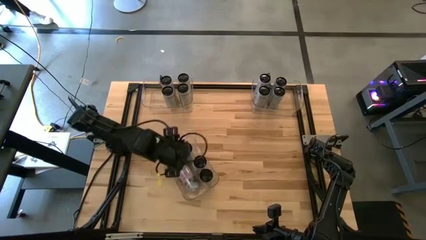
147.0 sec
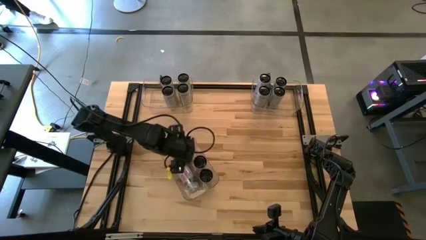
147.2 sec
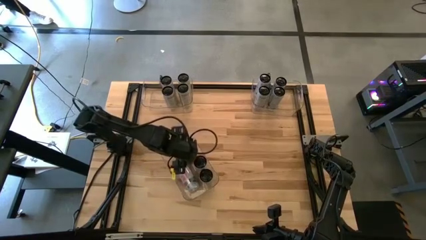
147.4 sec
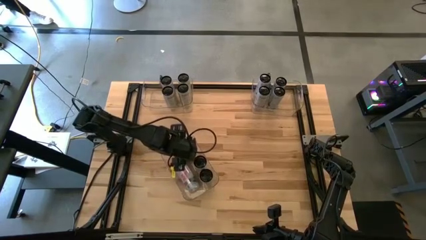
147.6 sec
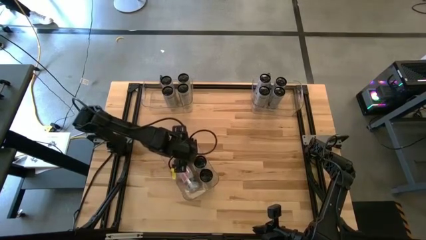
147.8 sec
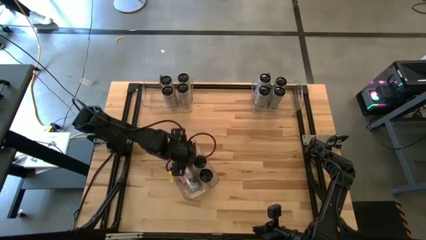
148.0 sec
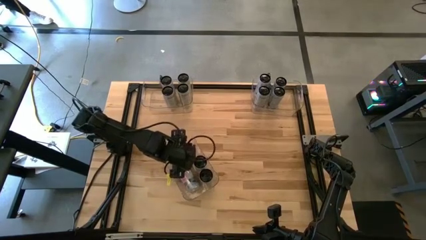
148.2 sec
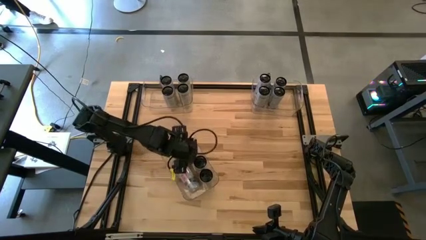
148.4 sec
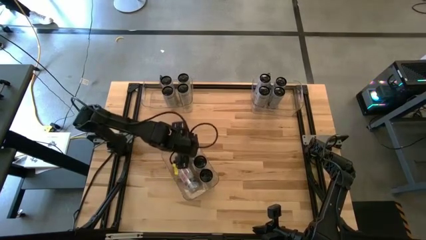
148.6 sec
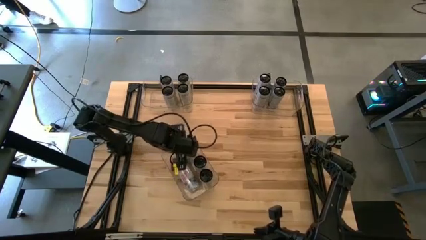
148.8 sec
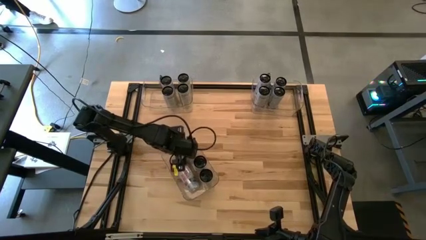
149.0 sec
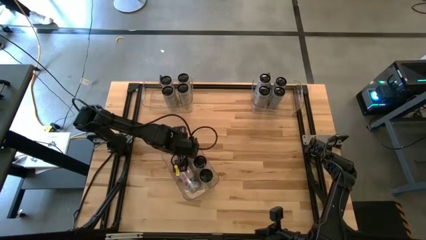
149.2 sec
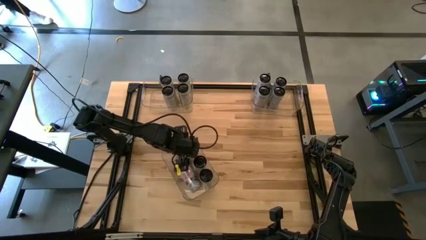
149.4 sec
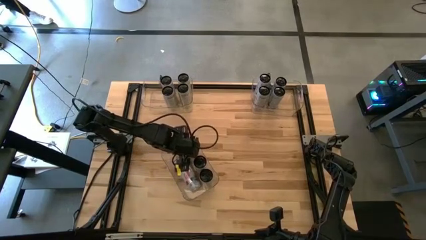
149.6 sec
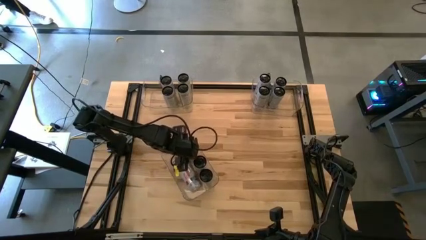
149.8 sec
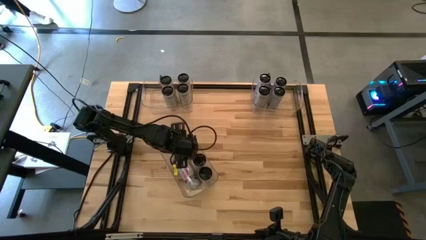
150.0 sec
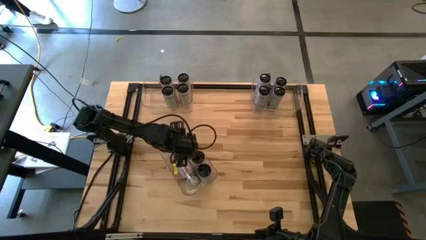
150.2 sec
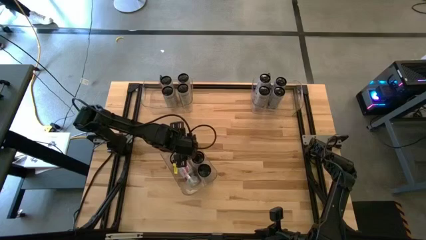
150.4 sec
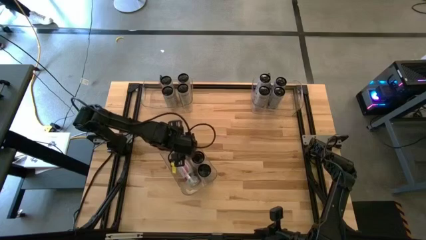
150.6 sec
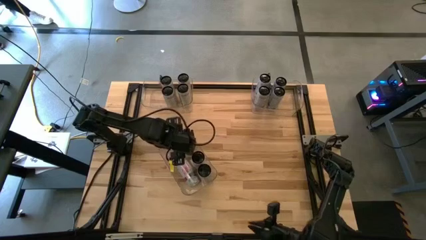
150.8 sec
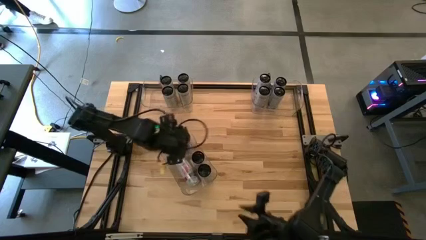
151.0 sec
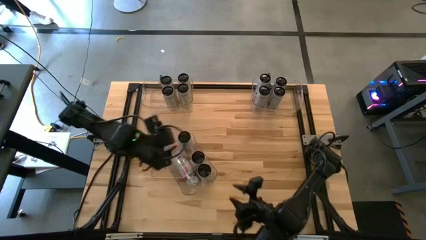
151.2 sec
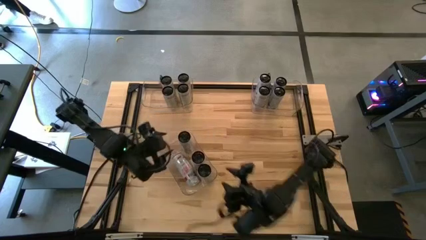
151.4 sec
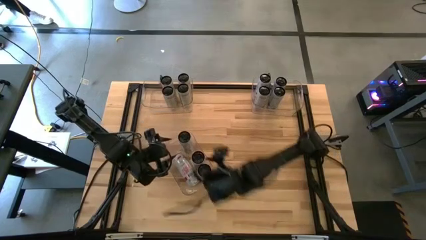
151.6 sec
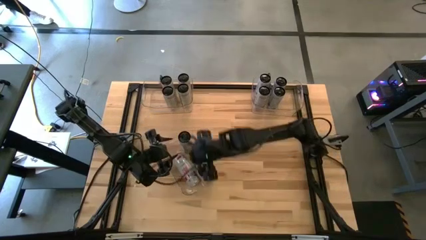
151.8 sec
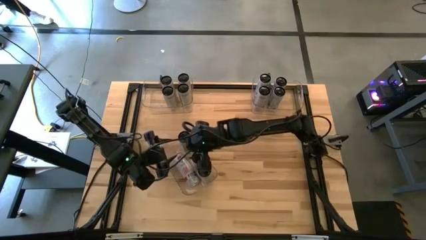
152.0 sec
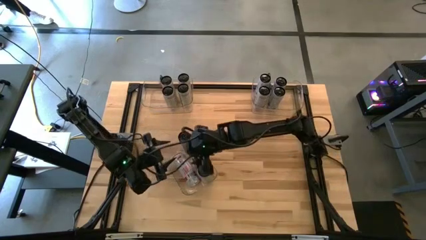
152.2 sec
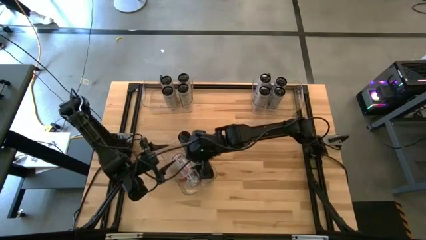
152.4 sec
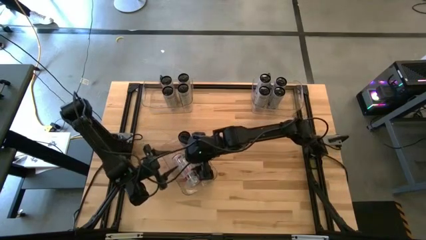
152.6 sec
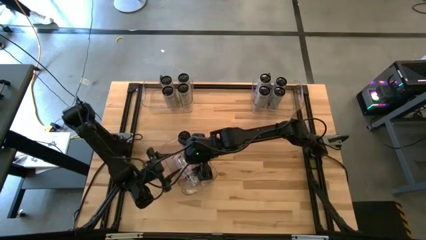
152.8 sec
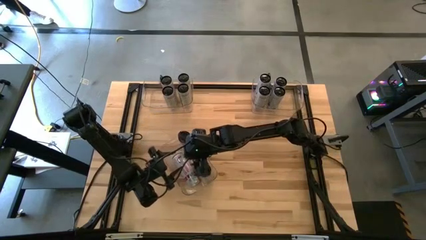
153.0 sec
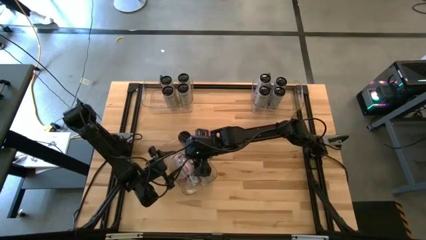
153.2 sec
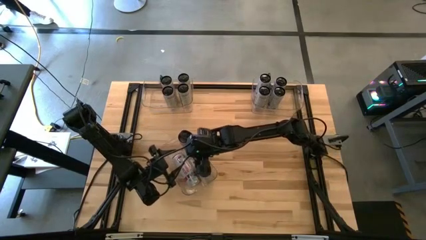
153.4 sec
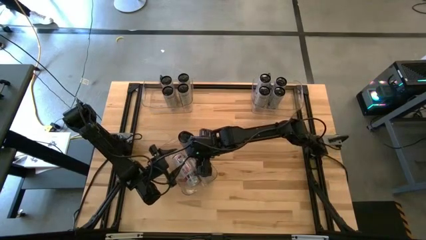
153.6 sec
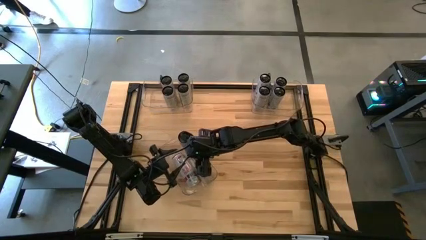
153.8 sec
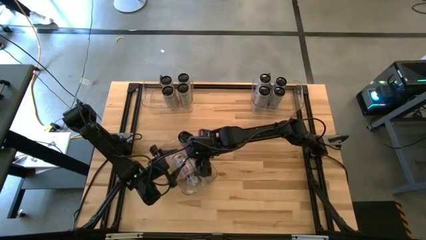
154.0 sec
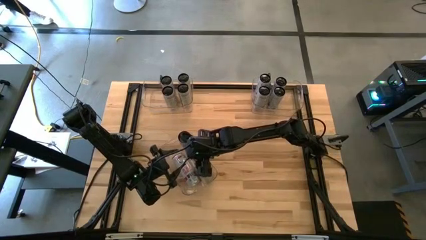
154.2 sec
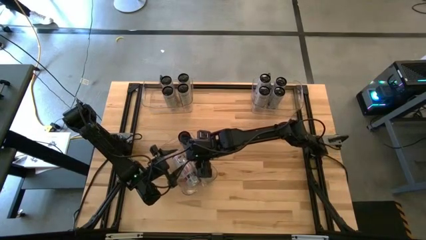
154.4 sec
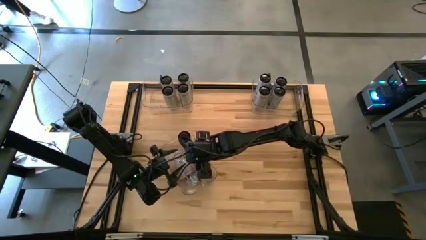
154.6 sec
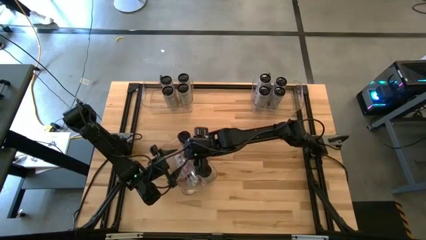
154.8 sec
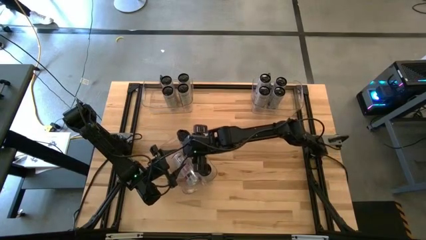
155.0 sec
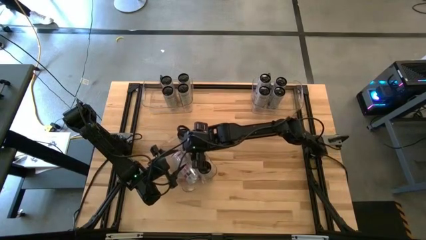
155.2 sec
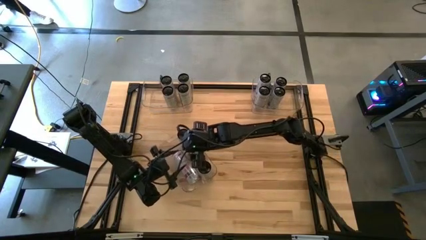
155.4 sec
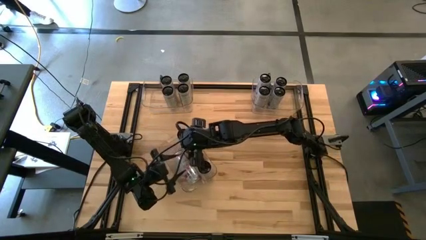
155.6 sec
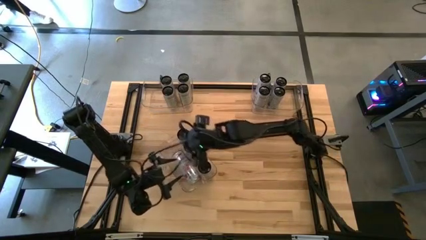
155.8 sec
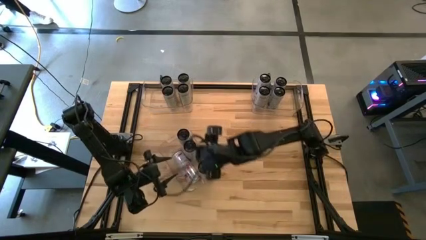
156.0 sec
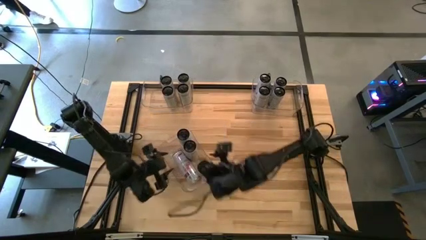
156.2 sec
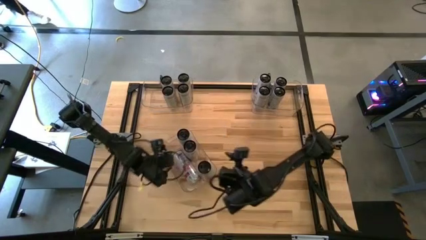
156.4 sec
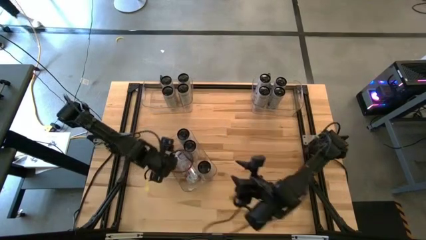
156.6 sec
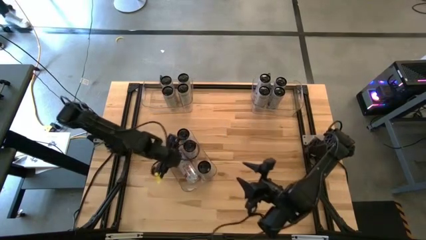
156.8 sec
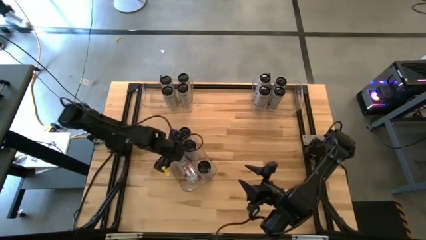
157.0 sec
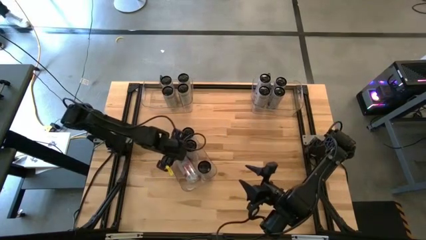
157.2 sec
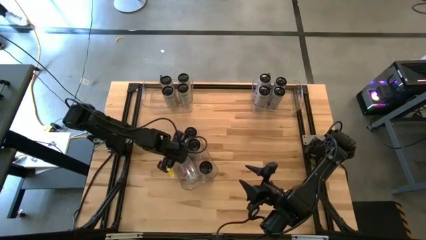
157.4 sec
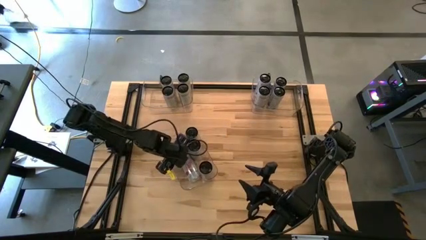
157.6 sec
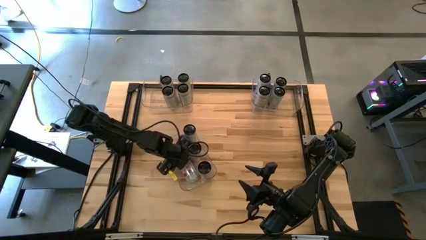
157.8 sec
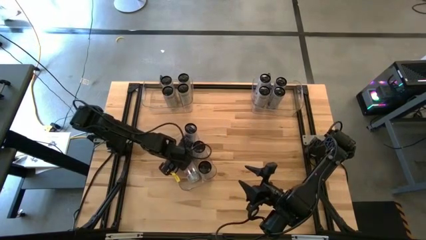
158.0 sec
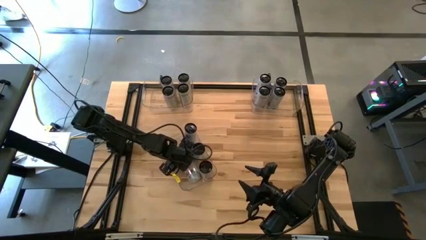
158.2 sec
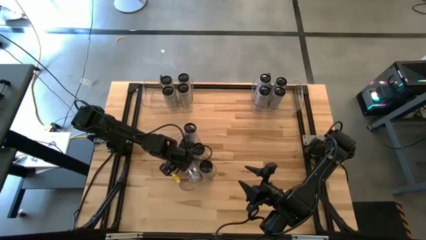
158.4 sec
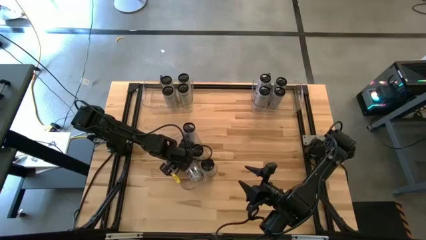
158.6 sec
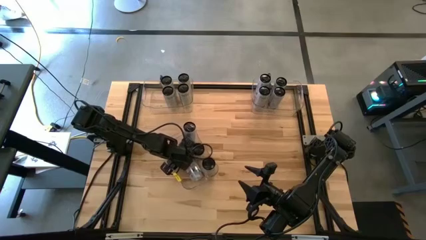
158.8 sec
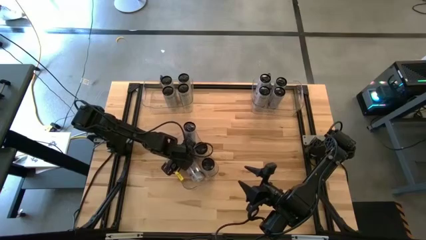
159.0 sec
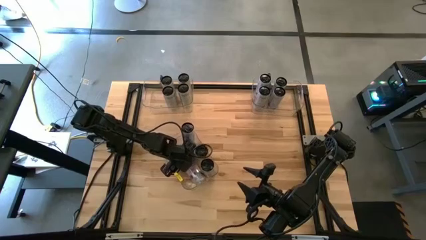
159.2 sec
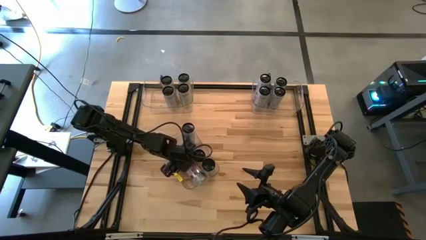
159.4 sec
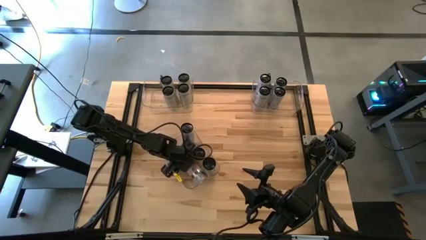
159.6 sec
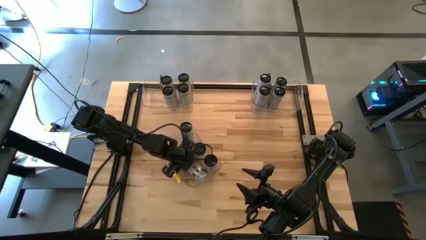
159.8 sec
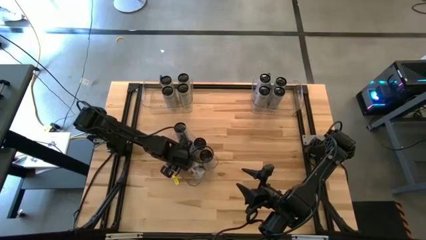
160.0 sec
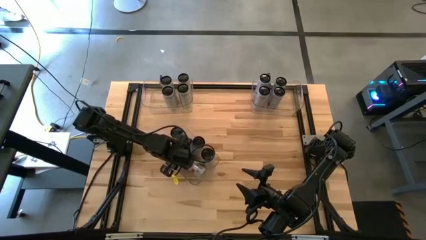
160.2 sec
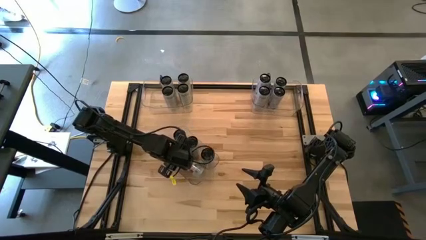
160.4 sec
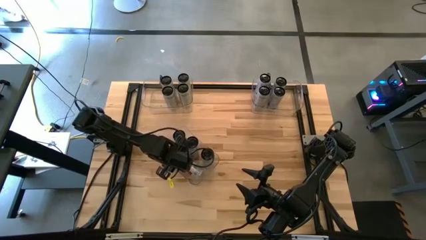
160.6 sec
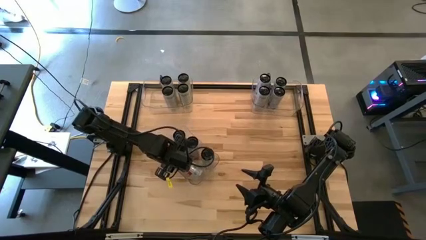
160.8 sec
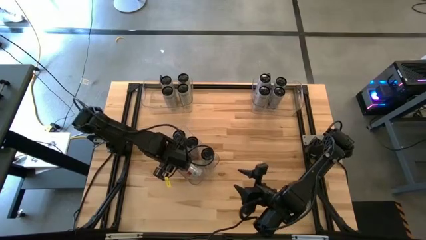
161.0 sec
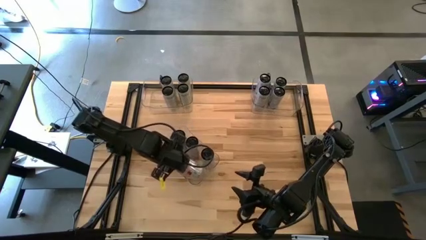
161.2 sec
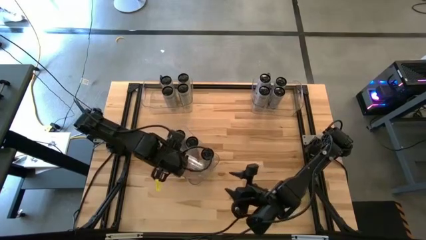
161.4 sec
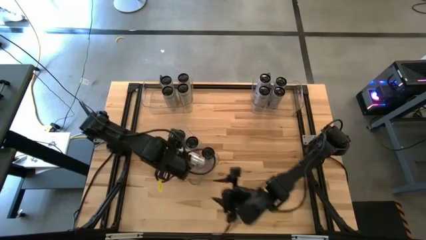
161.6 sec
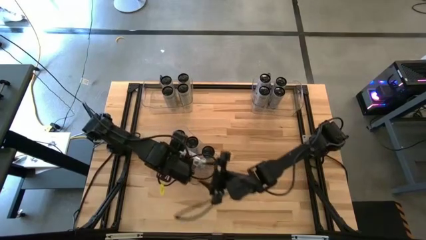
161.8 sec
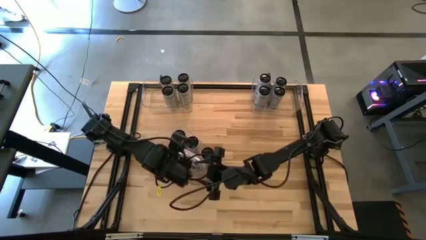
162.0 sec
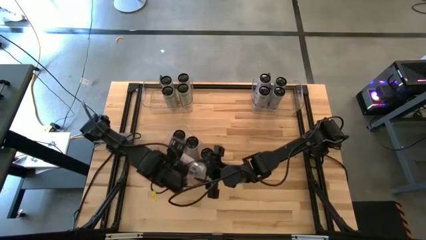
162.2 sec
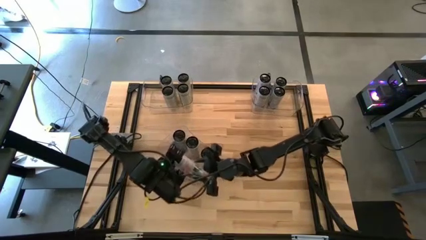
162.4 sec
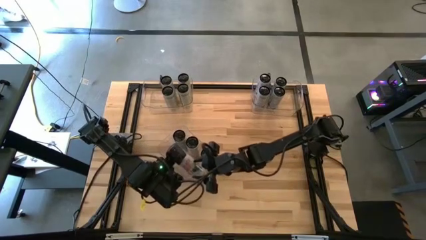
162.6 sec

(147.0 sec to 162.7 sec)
Task: Sort soda cans
Adjust all the white-pink soda cans into the center transparent bin

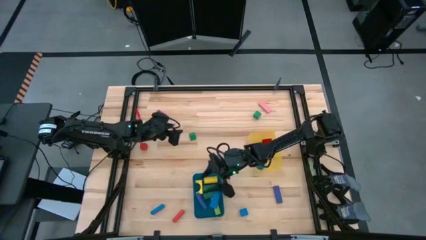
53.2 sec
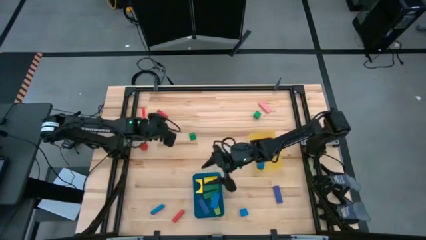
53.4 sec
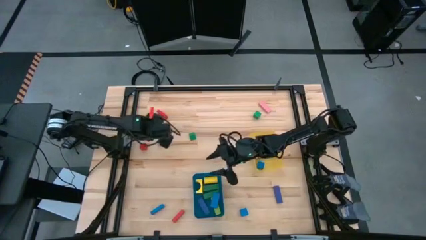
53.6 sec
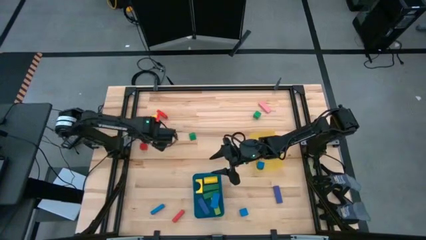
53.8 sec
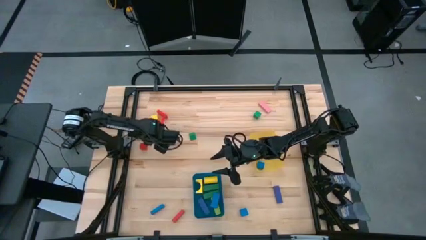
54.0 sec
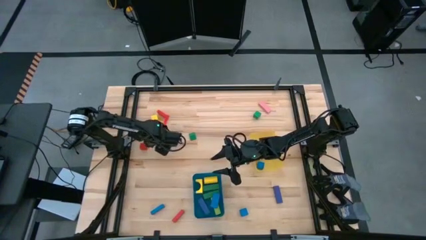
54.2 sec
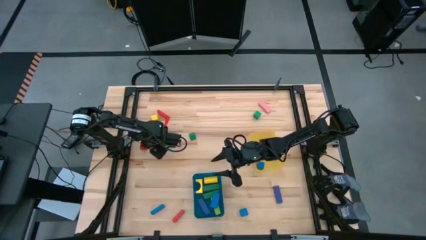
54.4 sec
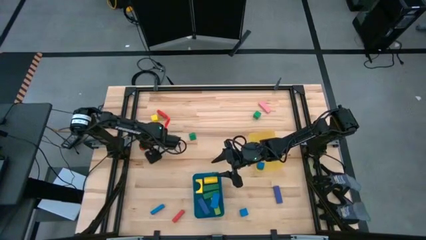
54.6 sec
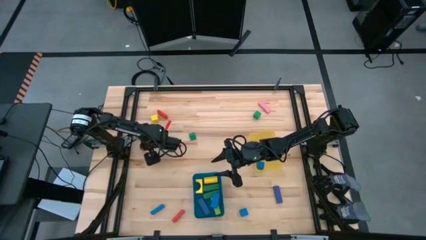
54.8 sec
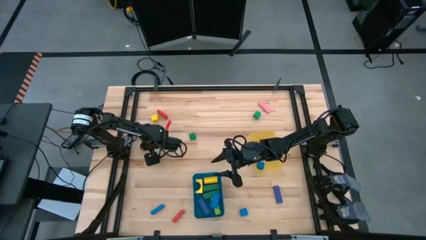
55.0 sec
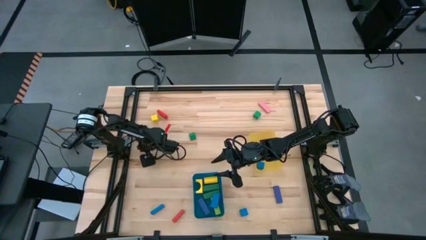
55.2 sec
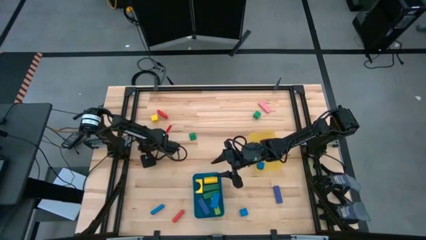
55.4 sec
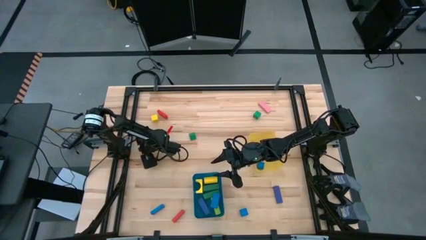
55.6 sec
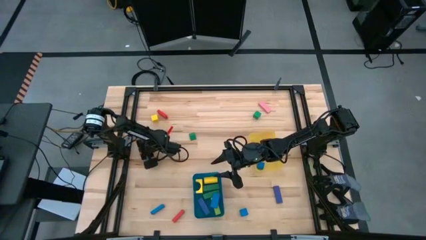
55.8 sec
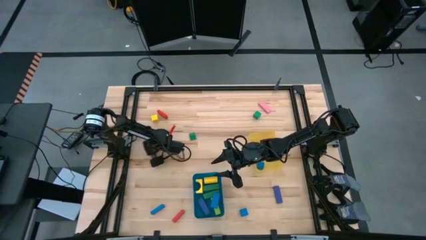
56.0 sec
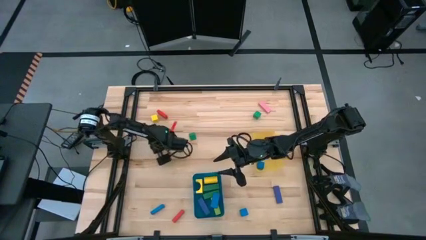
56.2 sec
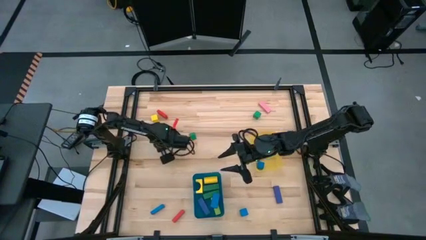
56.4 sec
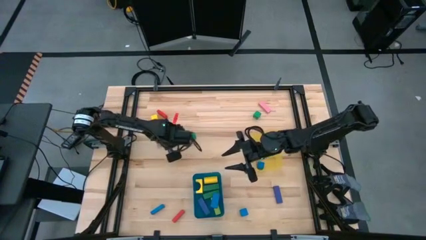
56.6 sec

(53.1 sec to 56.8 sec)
Task: Sort blocks by size
Put the small red block into the yellow bin
